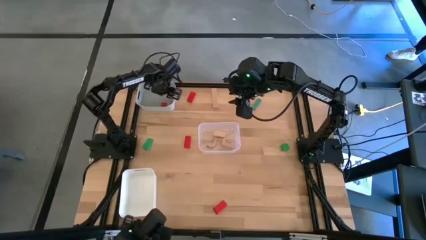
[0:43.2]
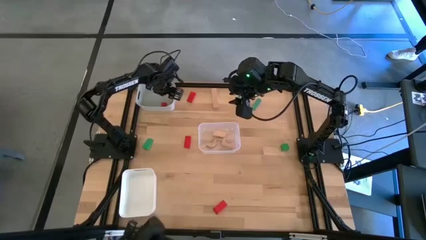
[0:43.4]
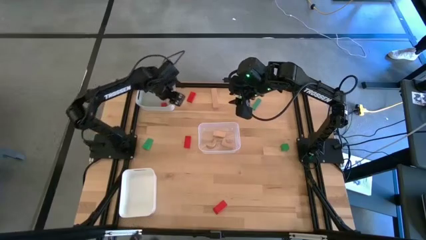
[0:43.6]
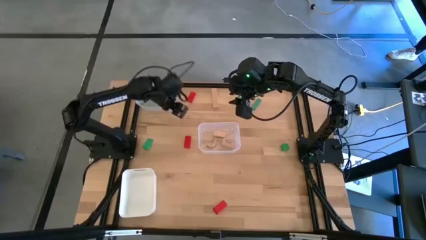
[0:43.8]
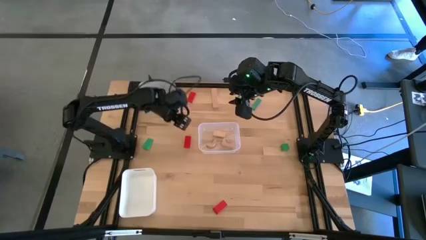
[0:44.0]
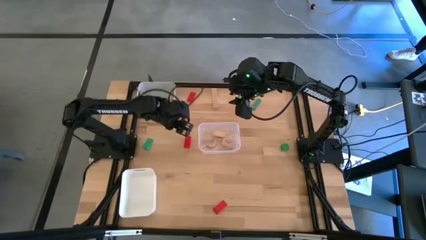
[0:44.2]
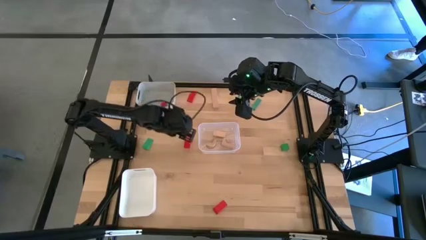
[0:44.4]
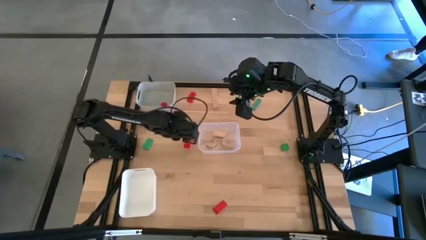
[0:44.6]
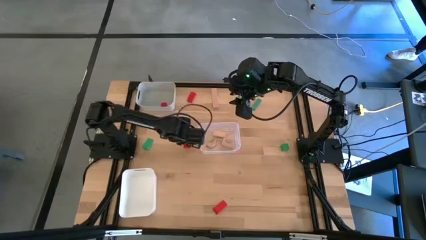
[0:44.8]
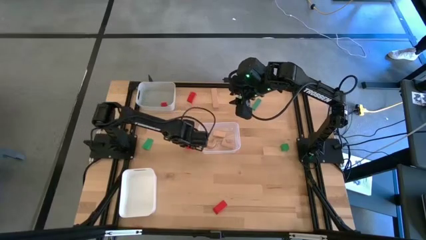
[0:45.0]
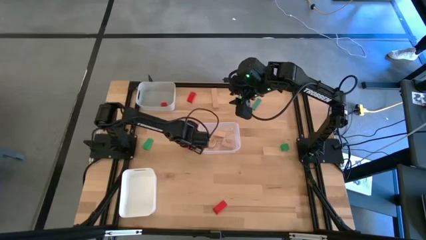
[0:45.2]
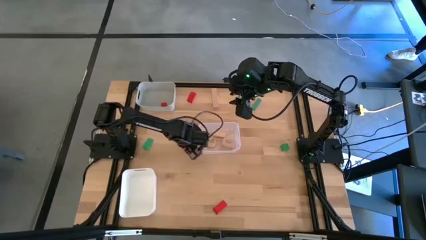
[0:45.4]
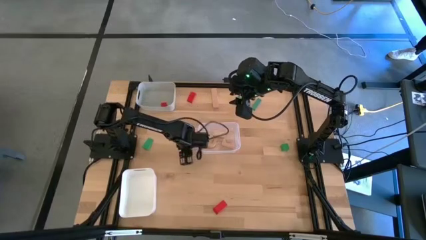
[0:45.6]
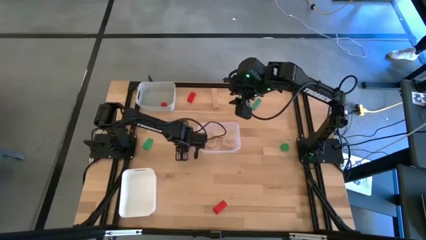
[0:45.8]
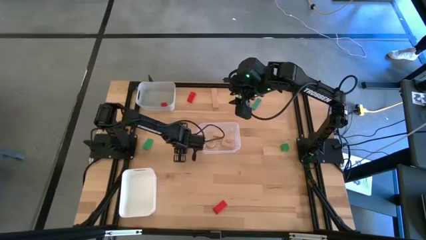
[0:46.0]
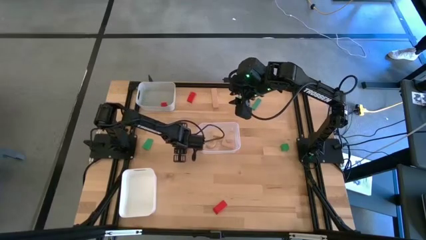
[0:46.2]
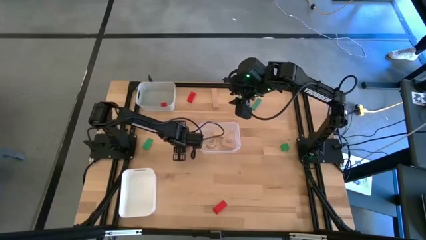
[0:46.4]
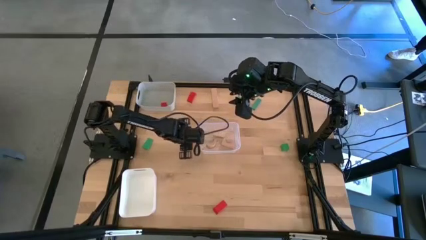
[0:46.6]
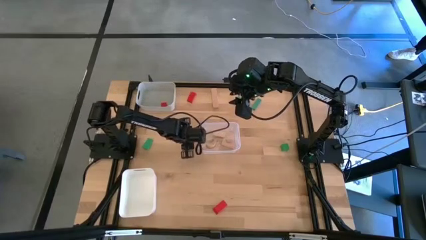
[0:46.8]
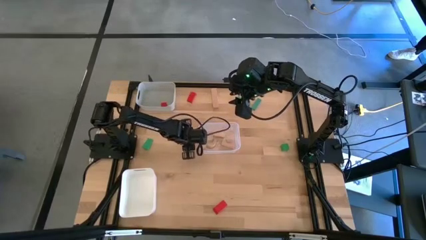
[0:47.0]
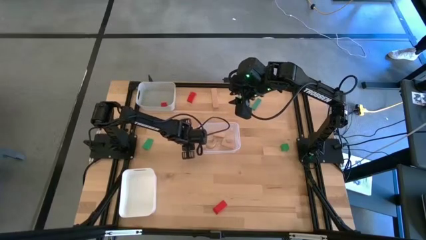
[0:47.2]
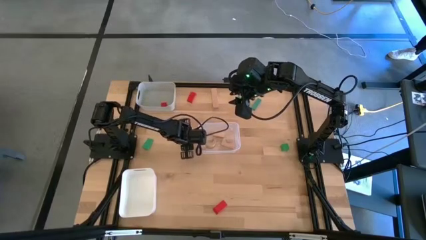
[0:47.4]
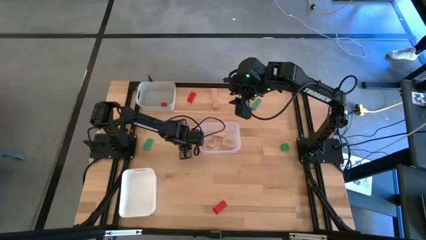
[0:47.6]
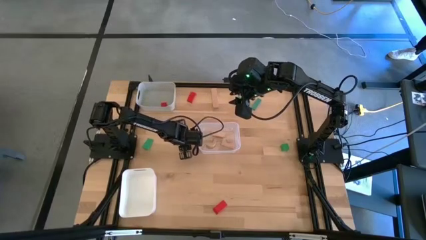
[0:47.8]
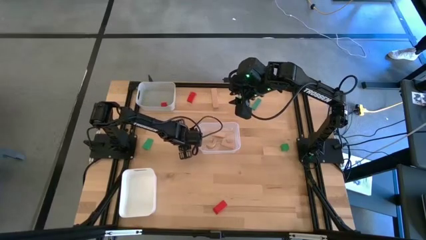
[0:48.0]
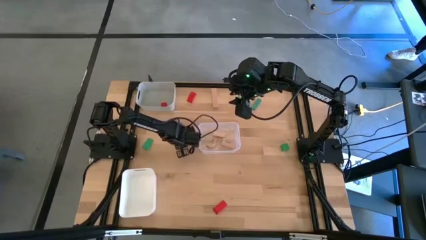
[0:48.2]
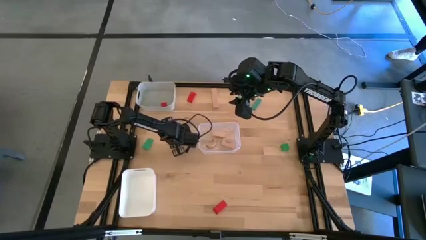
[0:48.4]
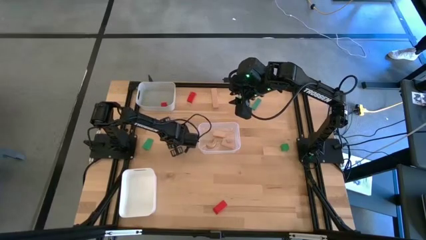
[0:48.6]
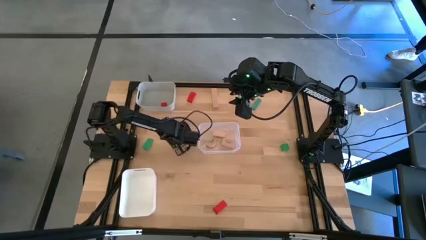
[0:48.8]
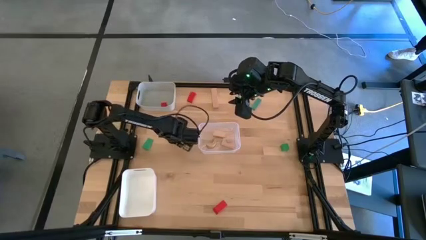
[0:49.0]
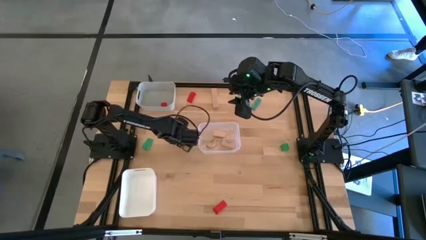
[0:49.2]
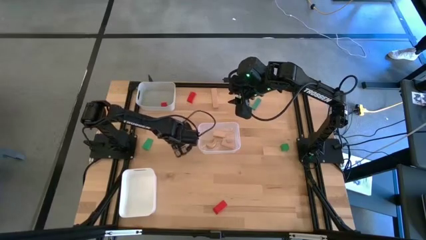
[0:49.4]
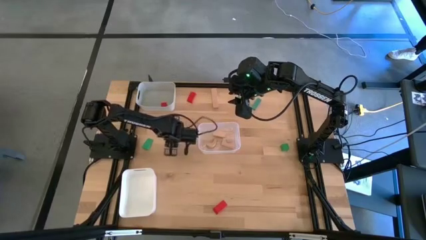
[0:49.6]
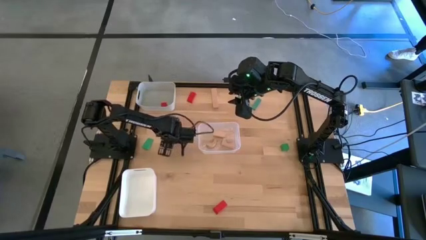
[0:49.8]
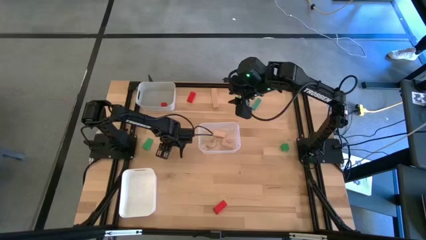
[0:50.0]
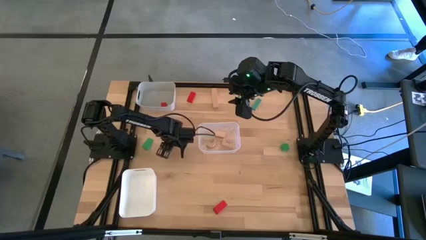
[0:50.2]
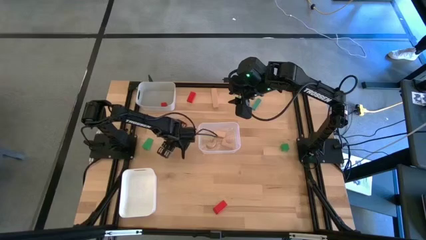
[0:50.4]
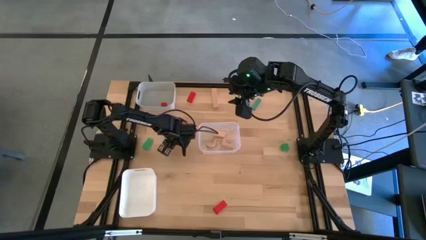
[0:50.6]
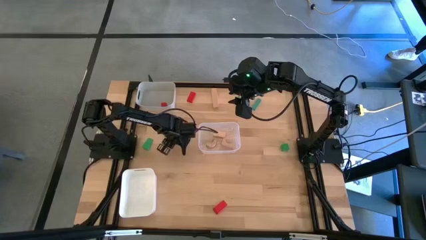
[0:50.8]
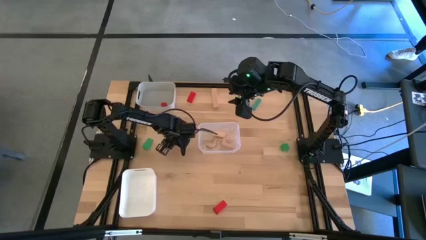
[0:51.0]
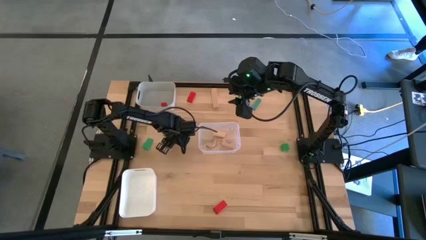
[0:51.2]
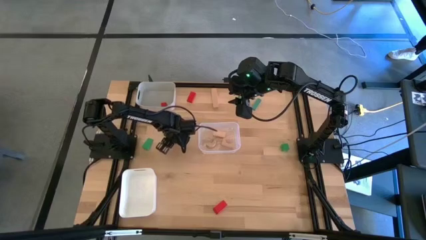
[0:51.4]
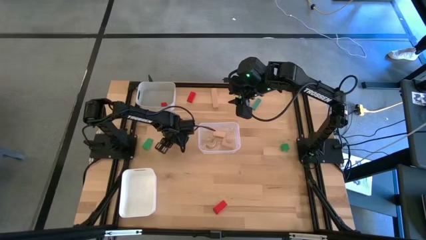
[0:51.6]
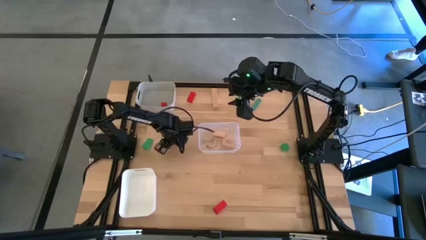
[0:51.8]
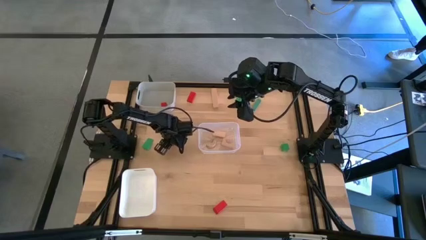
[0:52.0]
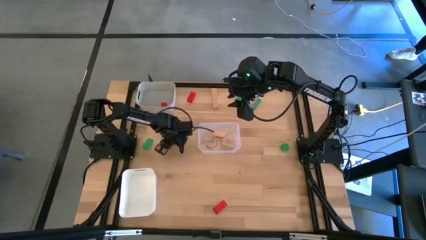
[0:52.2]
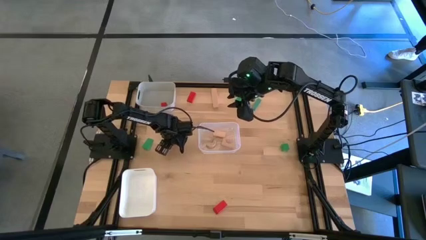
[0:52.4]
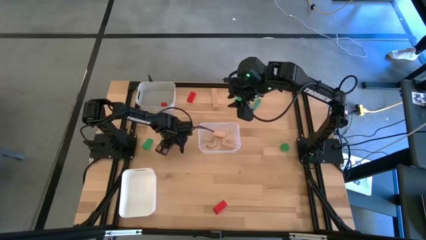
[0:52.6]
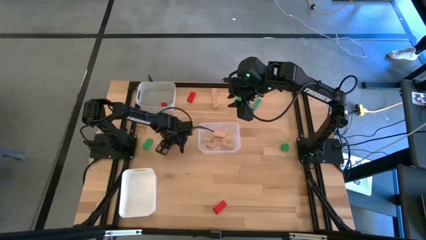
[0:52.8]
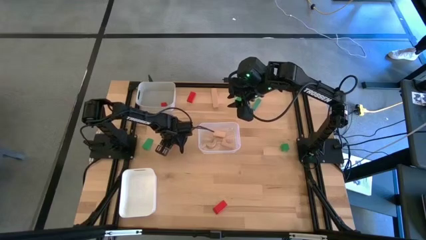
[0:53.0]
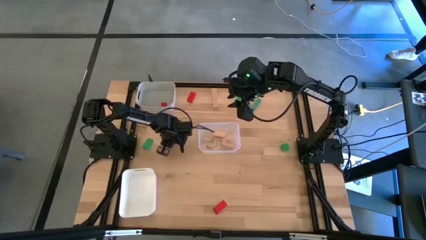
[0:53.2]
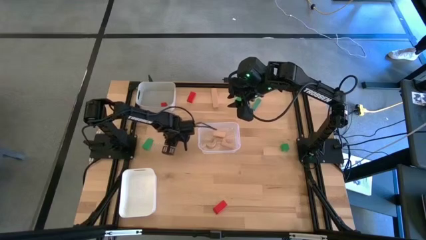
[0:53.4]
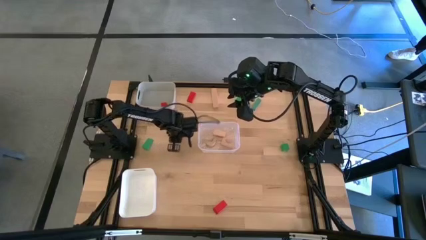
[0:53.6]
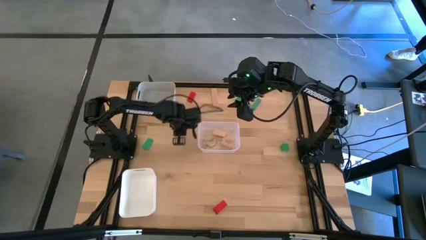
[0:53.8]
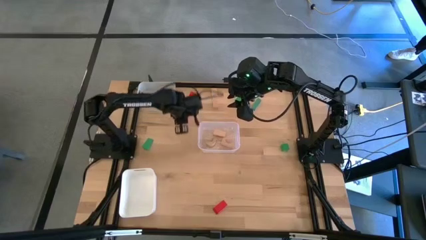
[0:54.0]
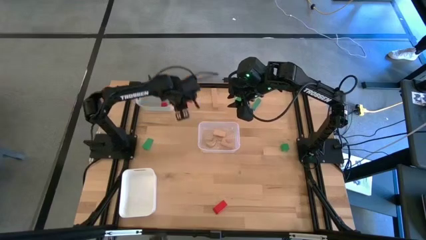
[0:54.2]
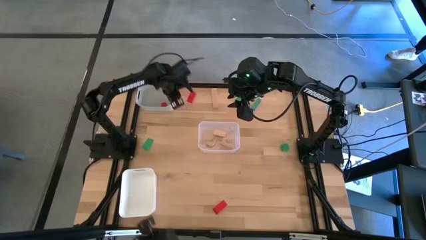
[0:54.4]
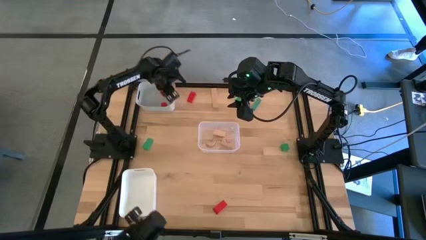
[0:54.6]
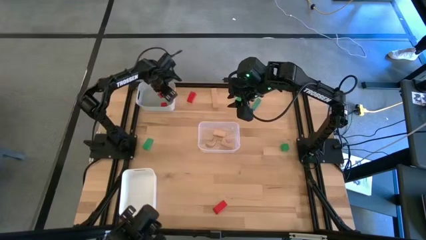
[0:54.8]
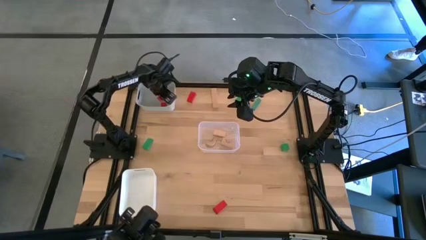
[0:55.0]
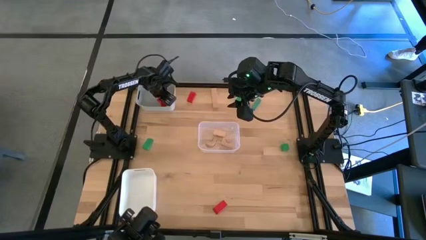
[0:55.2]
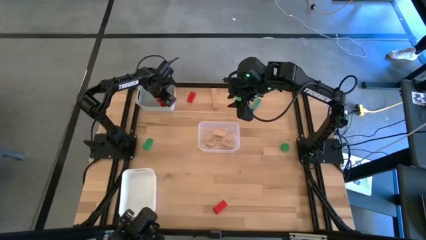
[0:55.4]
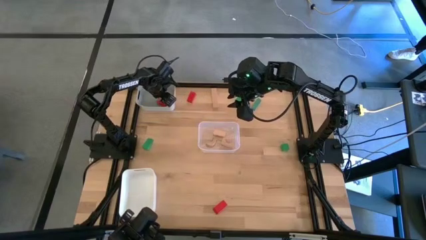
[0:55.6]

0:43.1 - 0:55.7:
Task: Sort & place blocks by color
Put the red block into the gray bin

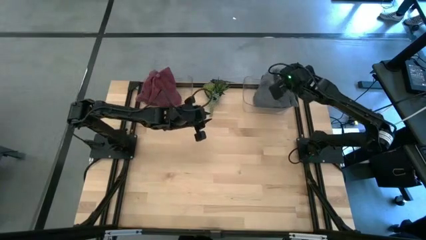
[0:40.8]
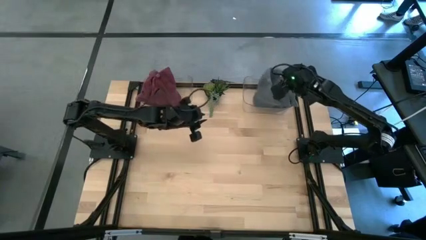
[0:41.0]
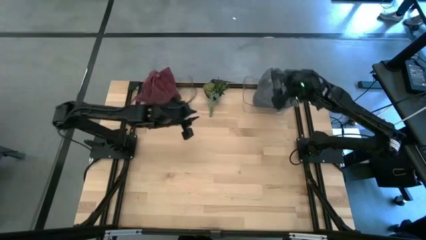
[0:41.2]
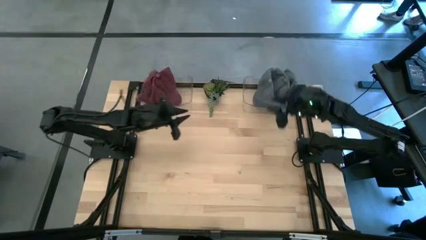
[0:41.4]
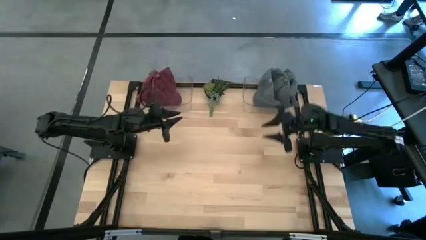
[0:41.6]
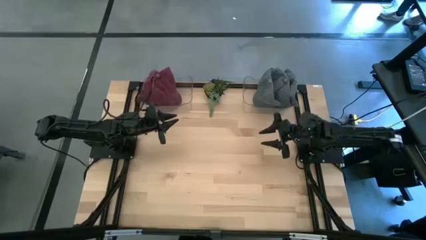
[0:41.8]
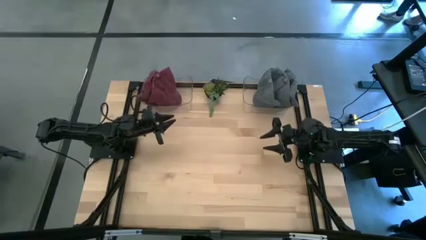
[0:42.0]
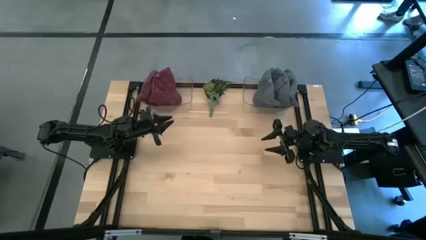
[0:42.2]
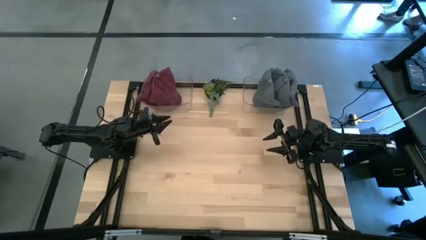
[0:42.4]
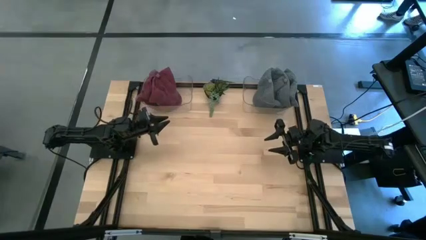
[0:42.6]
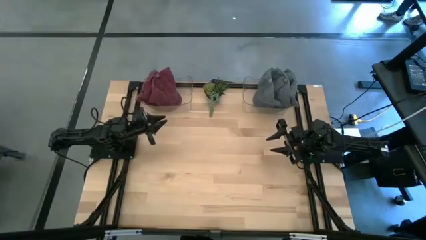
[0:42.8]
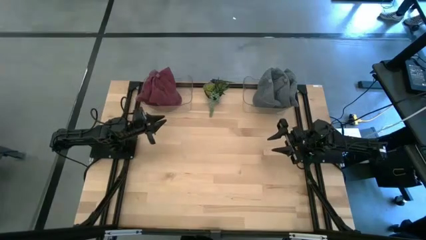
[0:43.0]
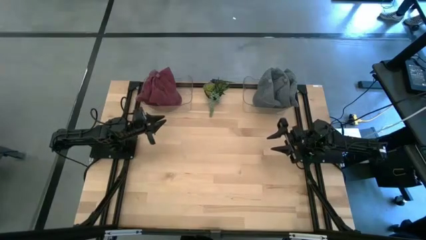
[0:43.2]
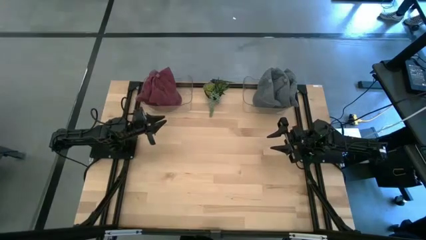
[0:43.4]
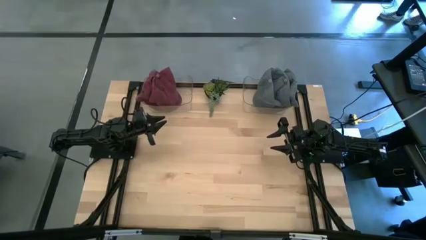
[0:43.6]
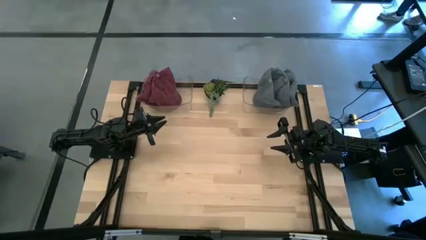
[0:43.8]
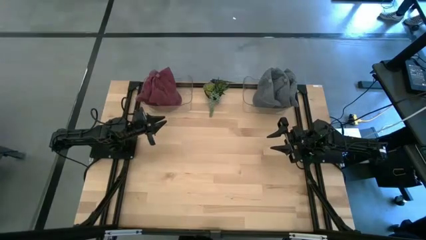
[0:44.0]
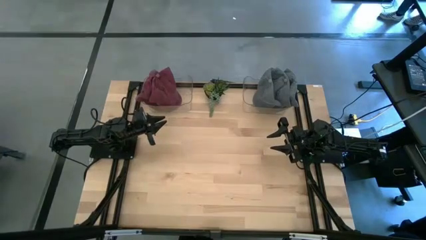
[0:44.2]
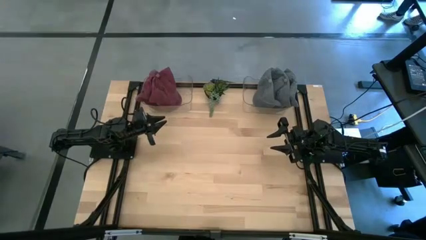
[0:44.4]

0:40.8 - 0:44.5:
Task: Pick & Place hat
Return to Home Position
